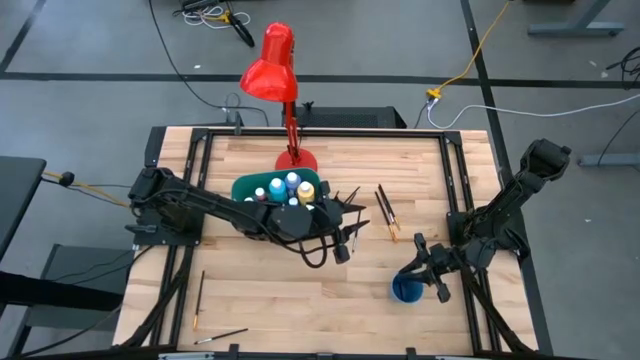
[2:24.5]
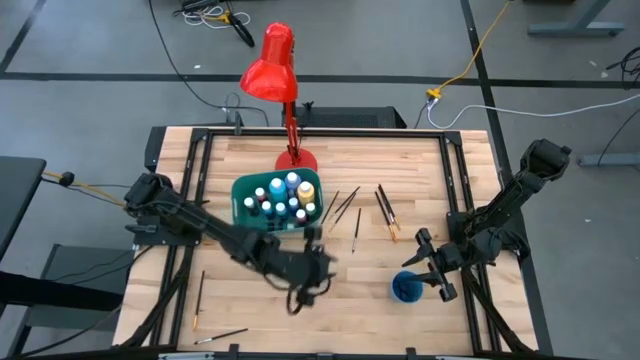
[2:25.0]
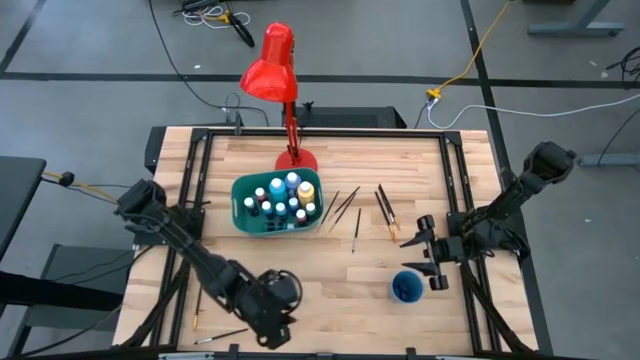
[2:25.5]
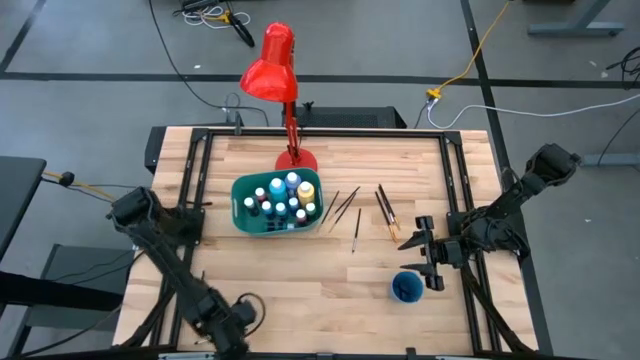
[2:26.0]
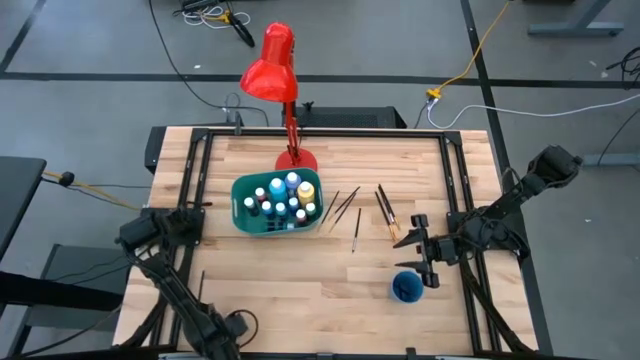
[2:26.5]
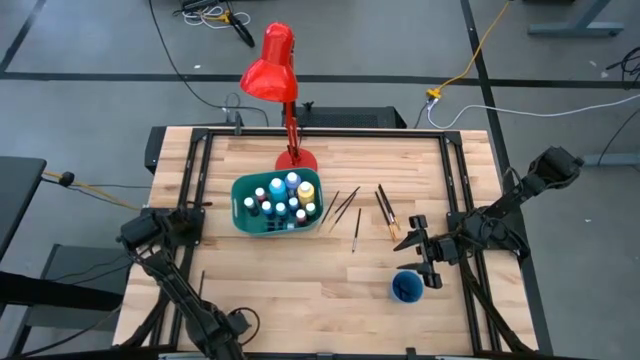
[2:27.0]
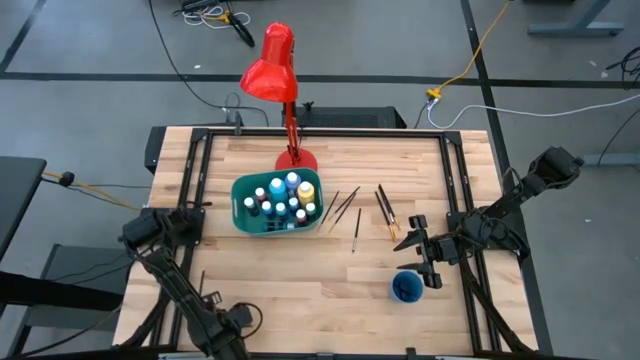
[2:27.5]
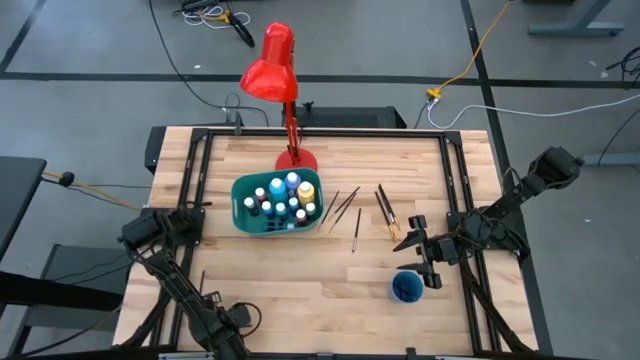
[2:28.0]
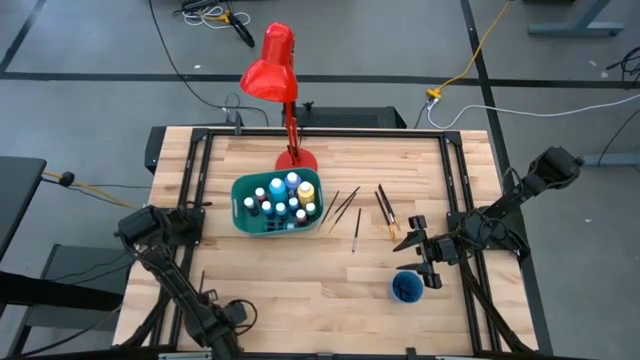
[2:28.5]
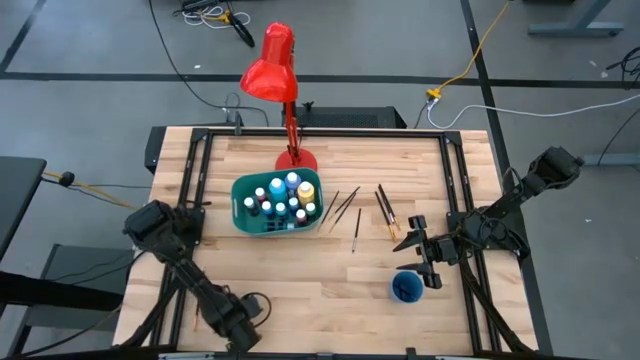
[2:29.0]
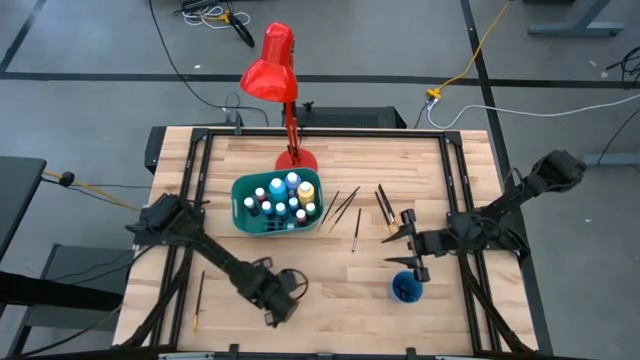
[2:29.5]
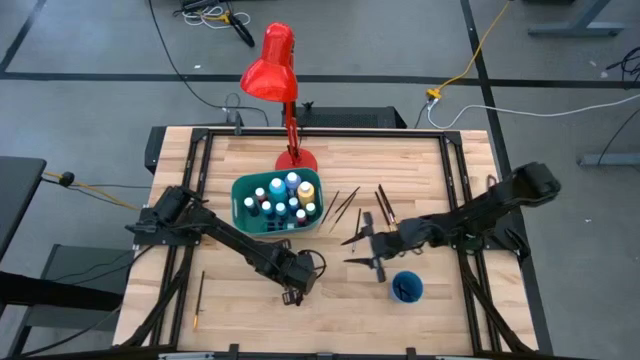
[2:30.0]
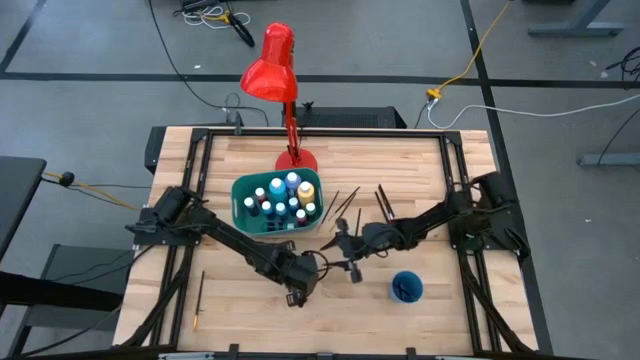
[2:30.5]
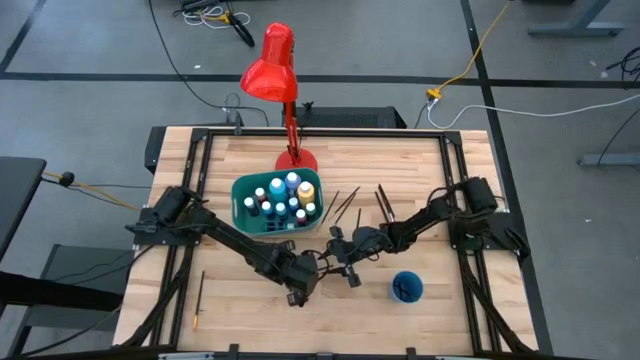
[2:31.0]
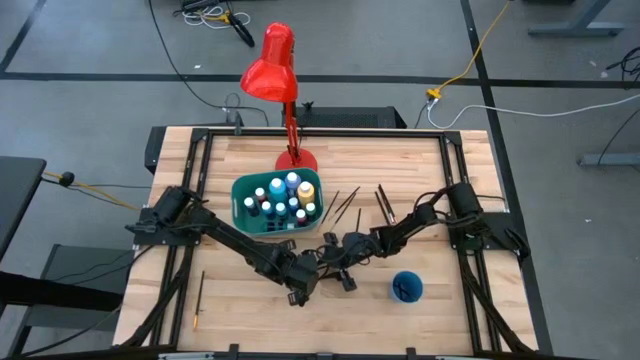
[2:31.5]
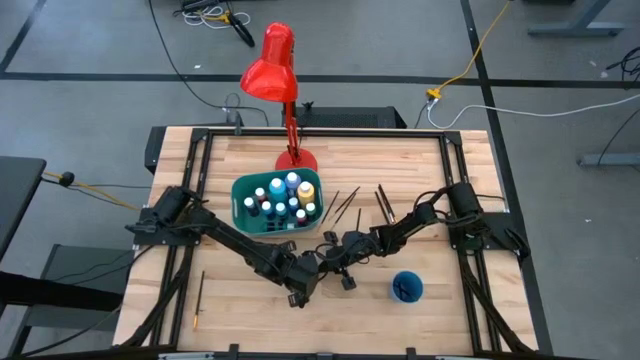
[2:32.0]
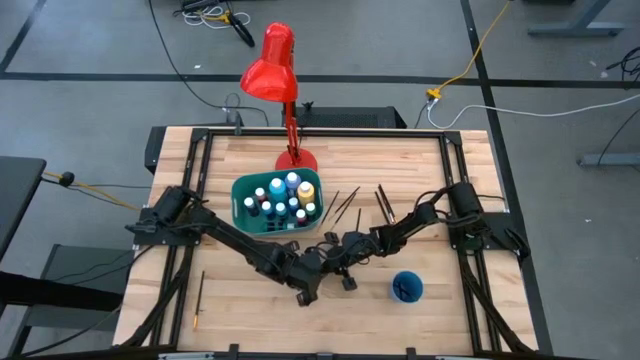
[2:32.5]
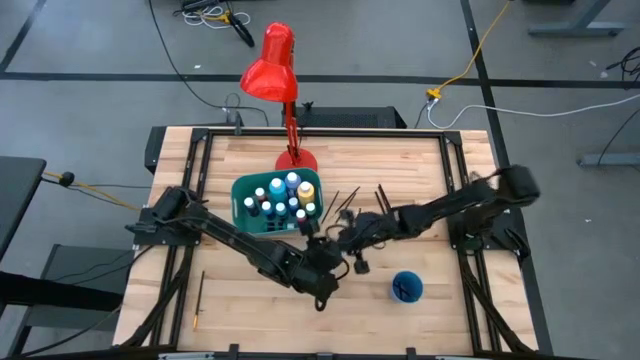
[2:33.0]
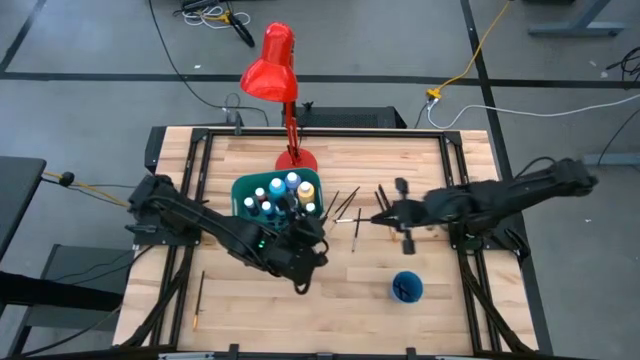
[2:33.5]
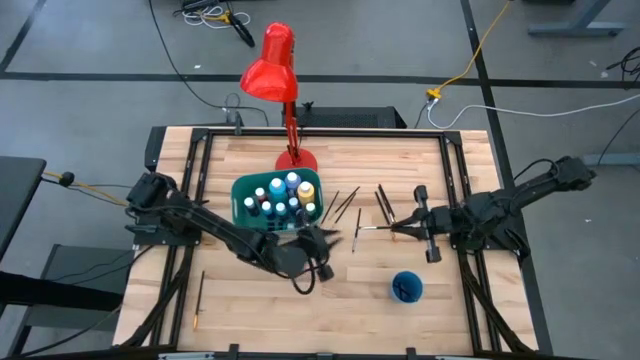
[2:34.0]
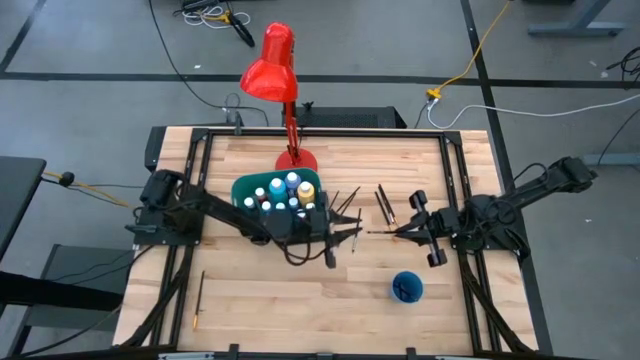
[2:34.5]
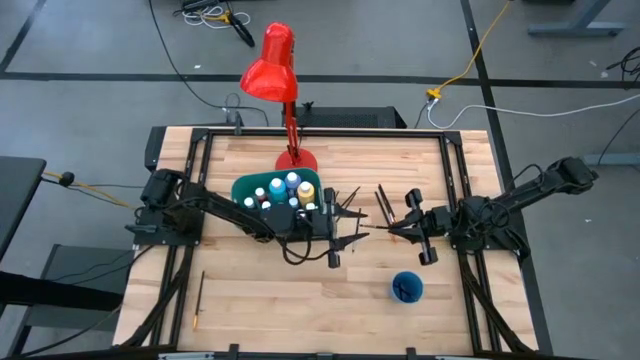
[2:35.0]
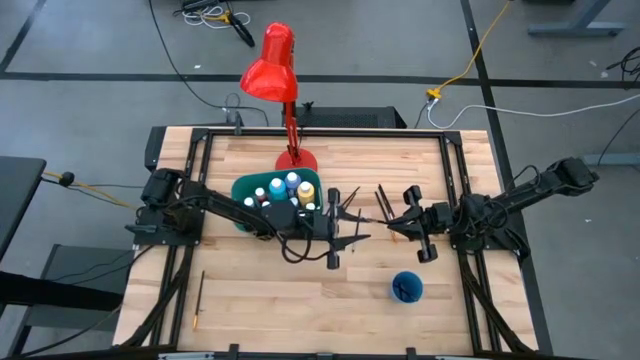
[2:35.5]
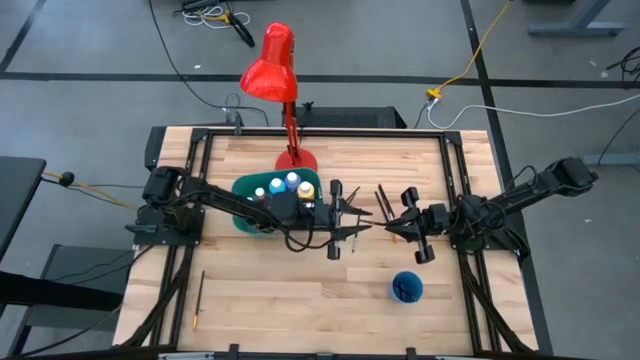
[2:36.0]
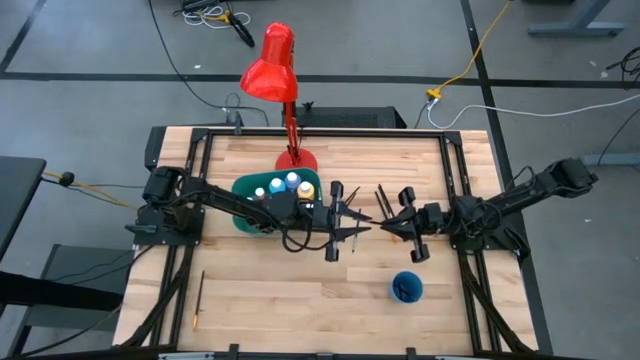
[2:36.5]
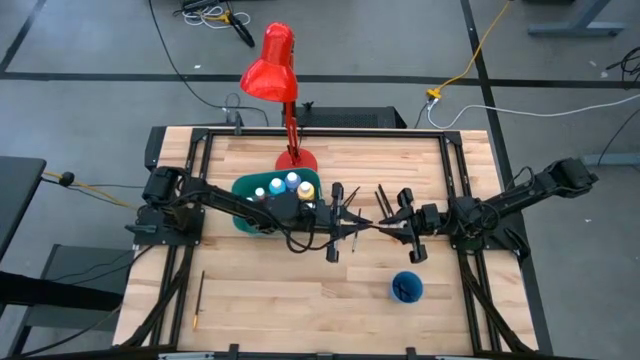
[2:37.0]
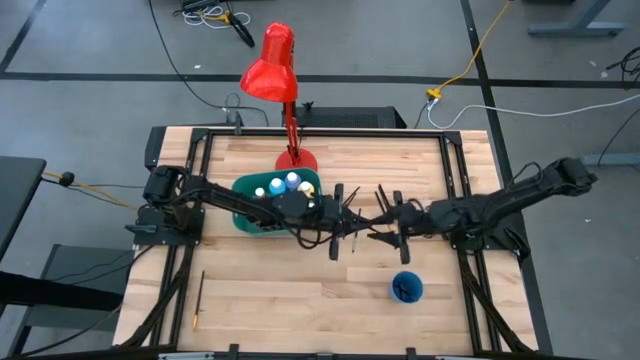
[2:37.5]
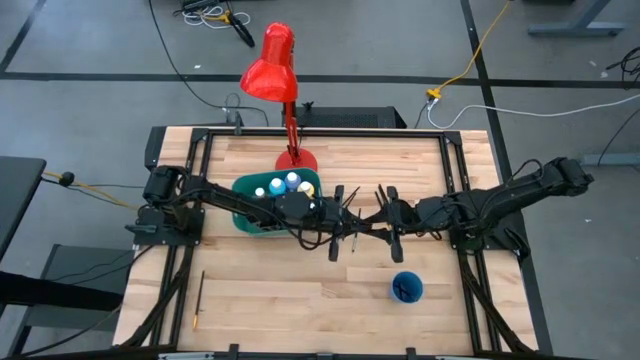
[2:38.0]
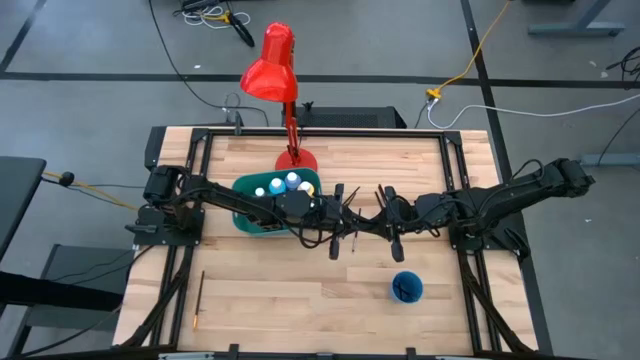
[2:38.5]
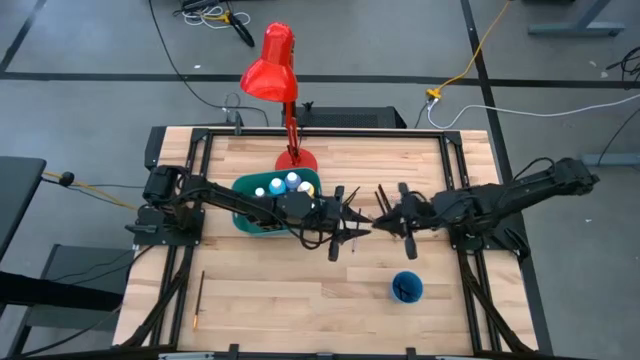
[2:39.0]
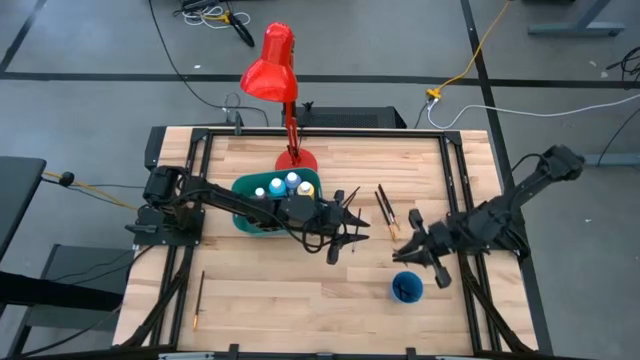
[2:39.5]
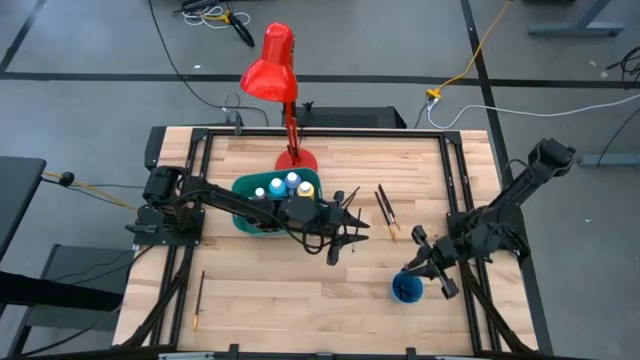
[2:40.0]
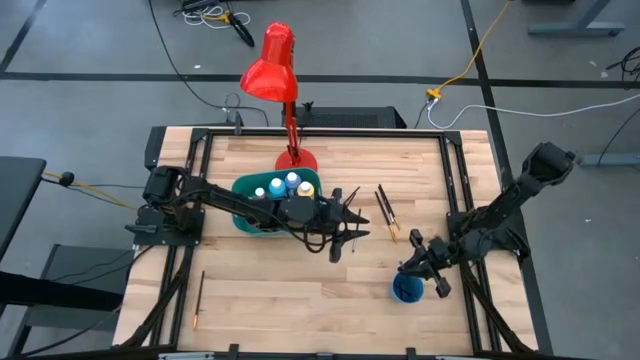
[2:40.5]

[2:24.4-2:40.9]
Task: Pick & Place Paint Supplies
Put the silver paint brush into the blue cup

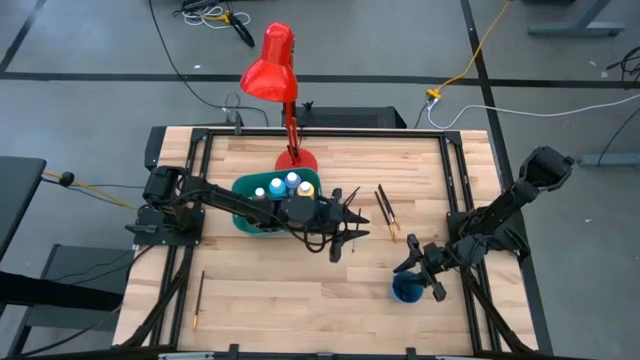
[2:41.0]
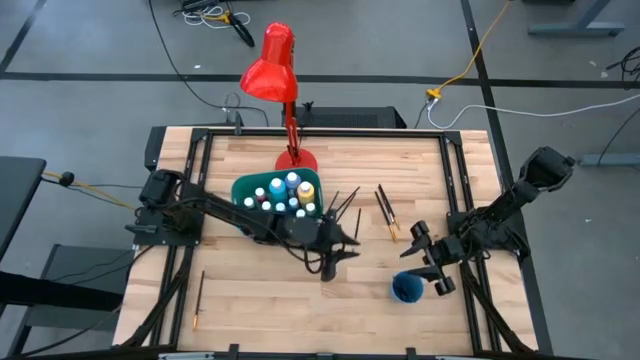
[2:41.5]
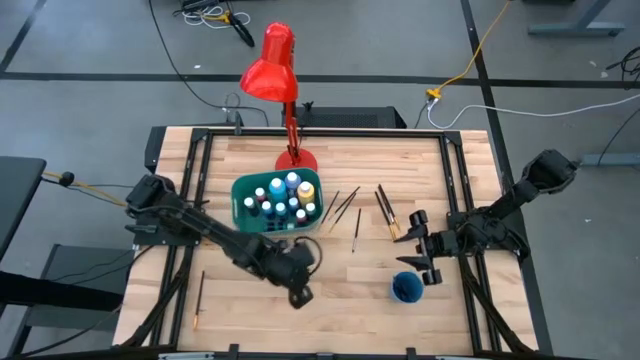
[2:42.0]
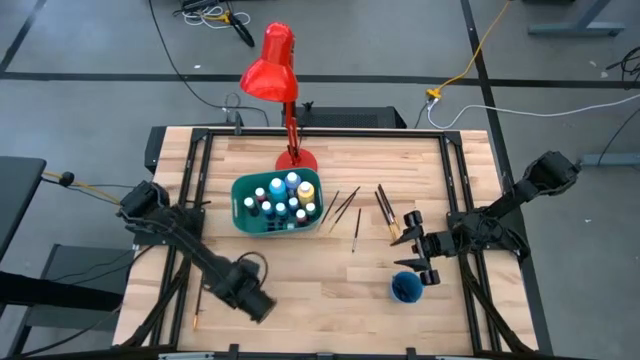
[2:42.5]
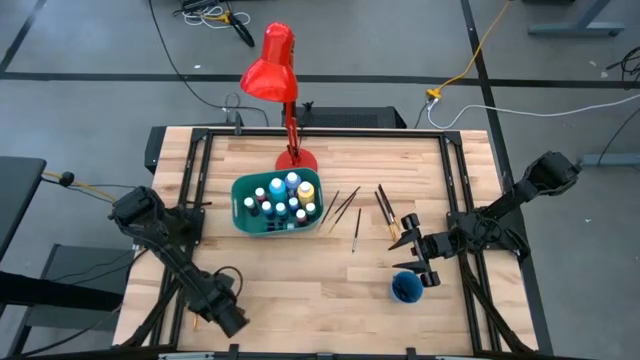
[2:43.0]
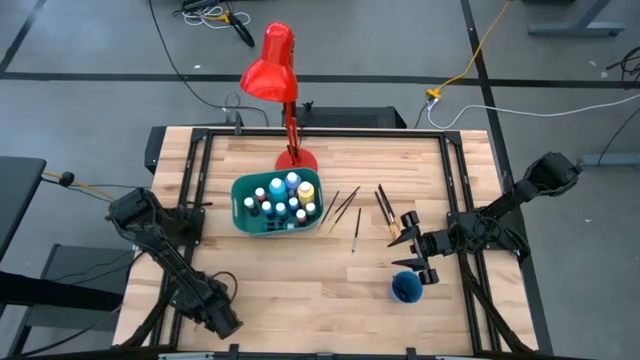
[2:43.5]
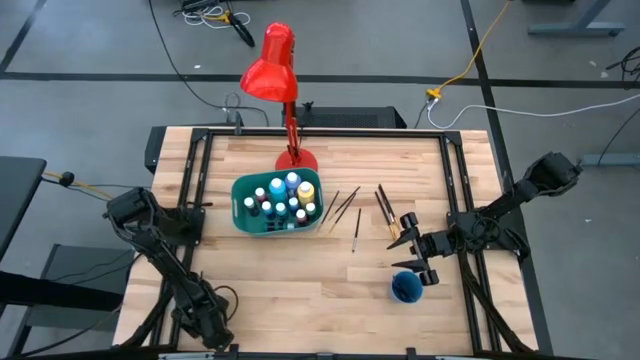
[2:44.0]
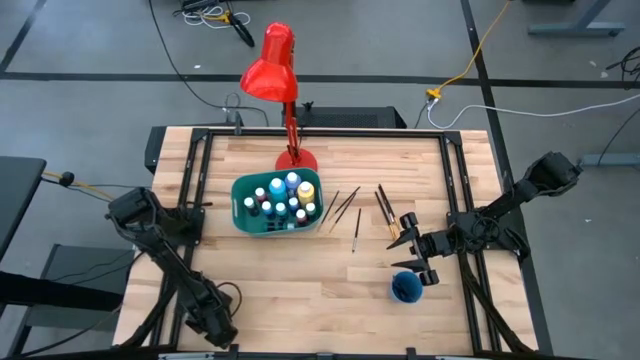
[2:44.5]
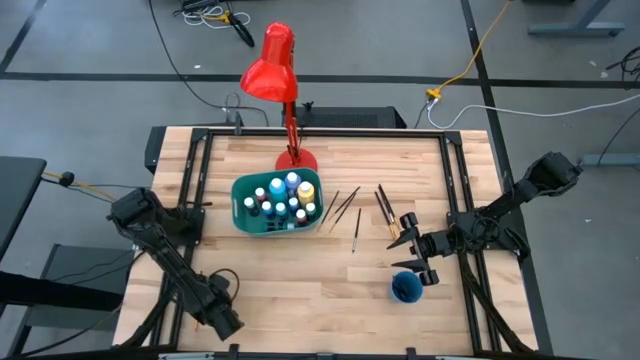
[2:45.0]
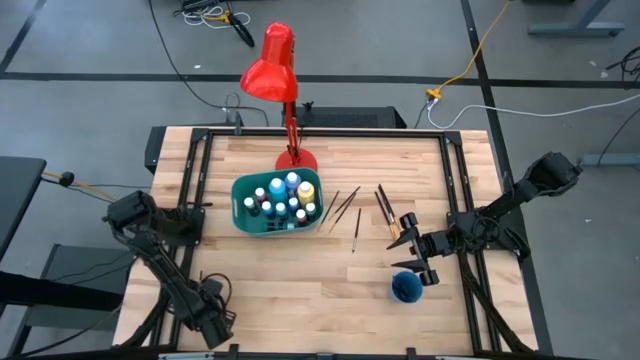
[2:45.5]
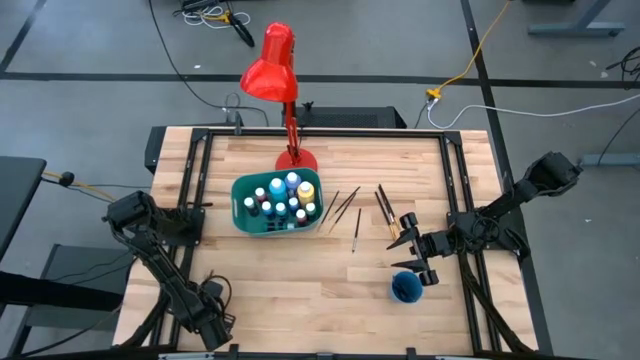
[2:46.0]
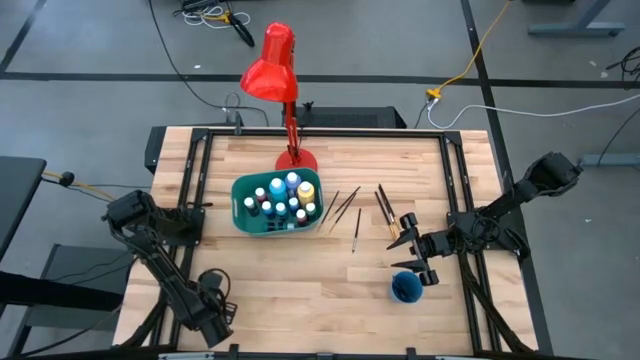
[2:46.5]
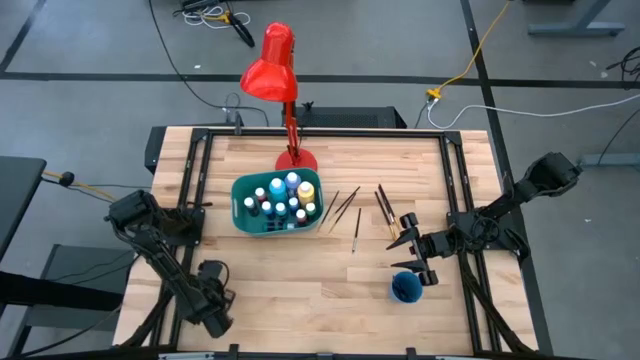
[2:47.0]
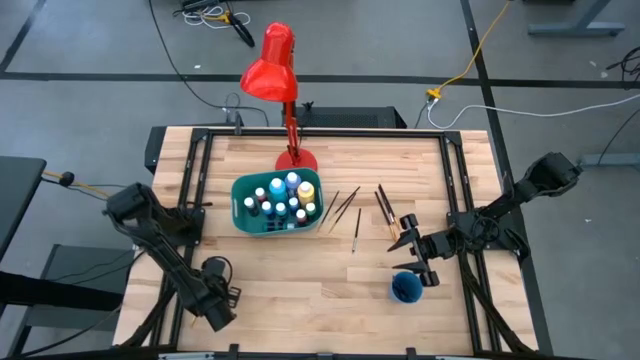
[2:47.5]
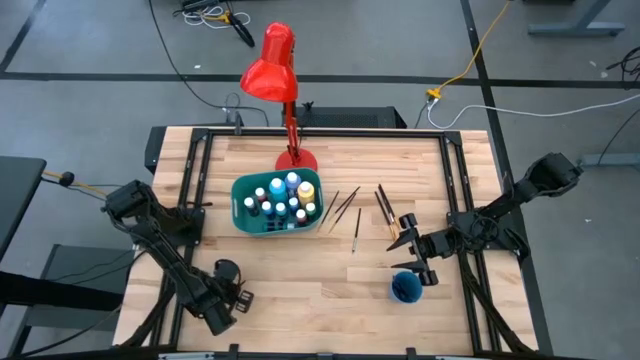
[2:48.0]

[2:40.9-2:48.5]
Put the gold paint brush into the blue cup
